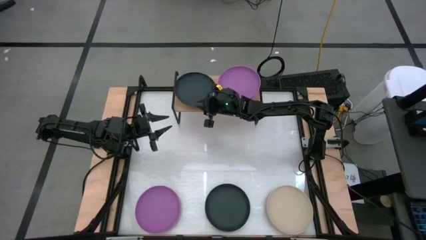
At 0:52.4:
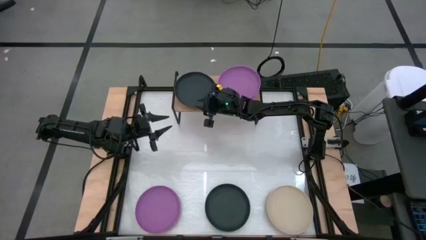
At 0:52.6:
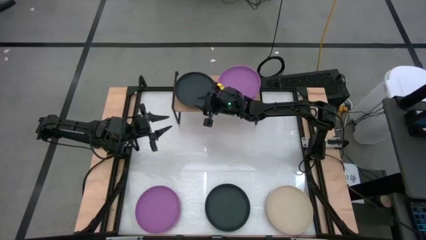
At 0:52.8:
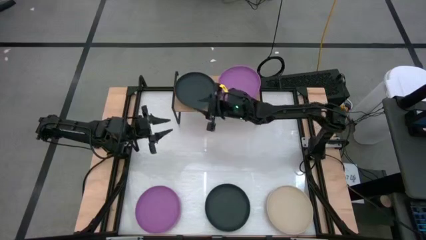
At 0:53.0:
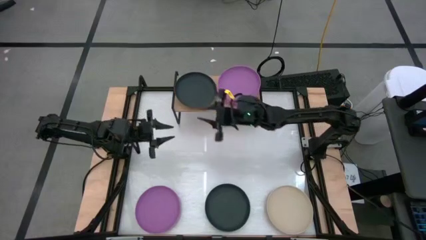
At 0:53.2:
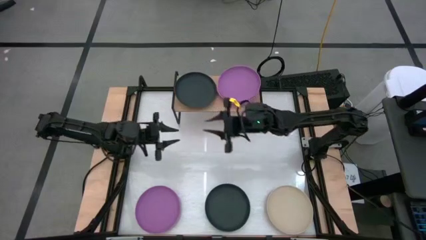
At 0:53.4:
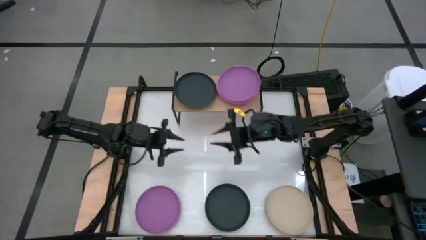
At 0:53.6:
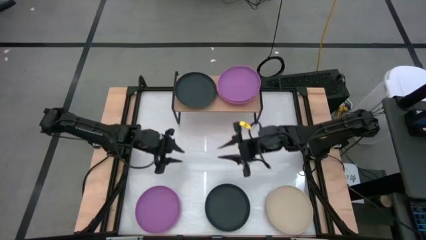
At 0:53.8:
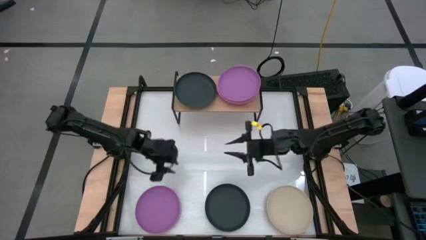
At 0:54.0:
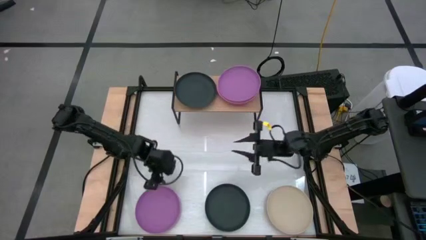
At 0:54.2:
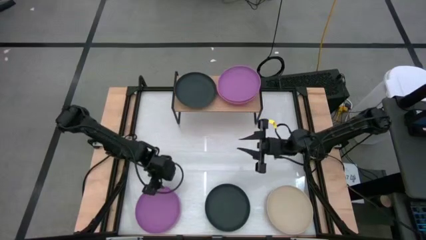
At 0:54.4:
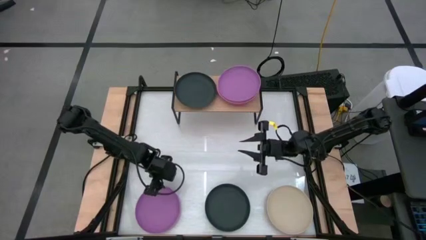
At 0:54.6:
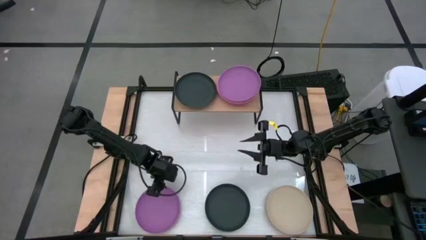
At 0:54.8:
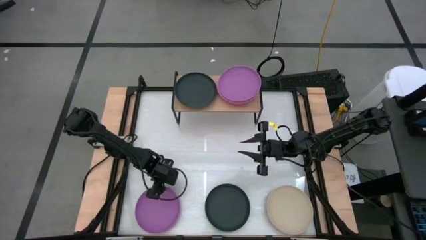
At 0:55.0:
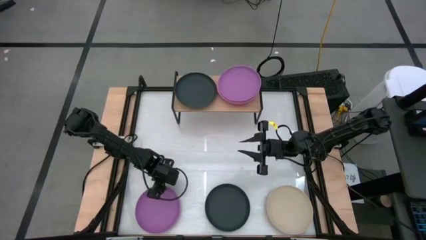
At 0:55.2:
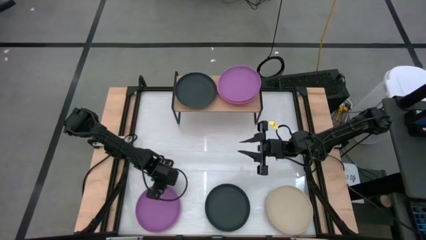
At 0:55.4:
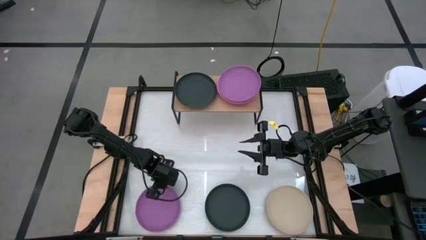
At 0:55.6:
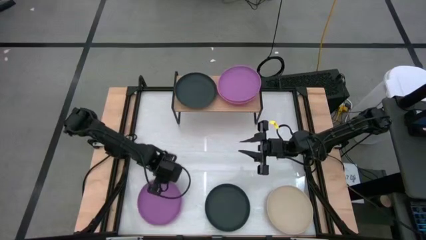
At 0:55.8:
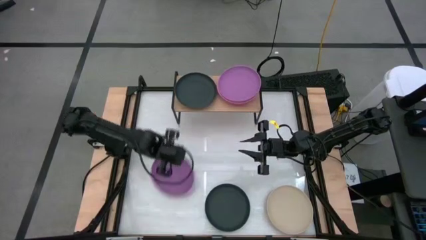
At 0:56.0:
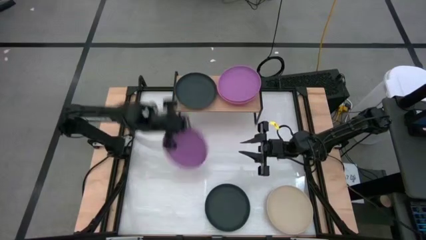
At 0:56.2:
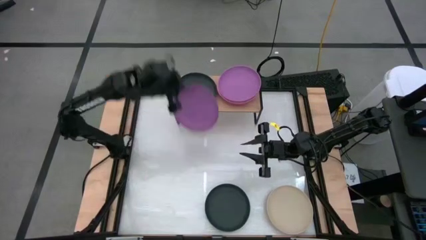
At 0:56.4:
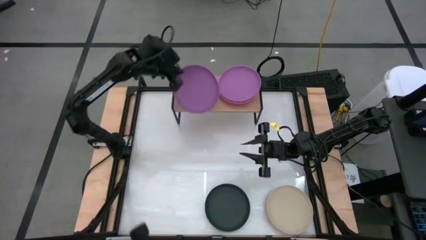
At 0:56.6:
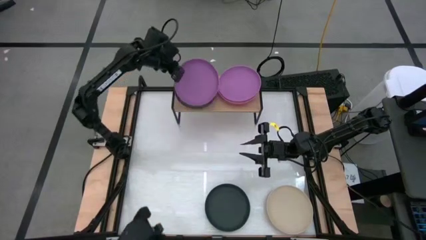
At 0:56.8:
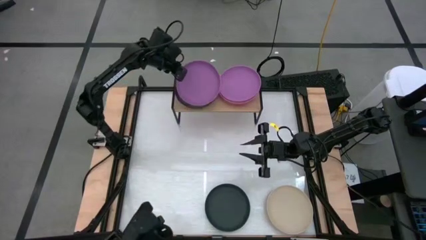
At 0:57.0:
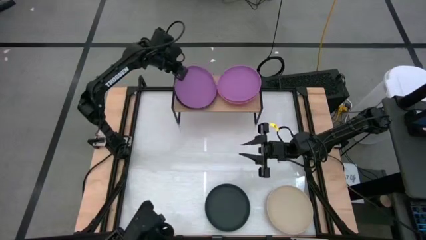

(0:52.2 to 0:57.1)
Task: Place and stack plates onto a shelf
Stack the purple plate on top of the black plate on the shelf

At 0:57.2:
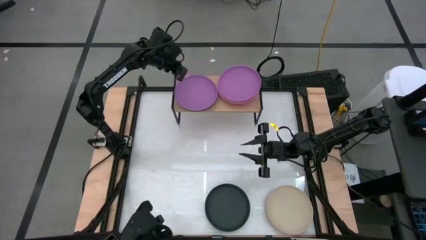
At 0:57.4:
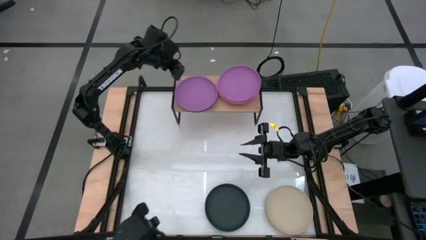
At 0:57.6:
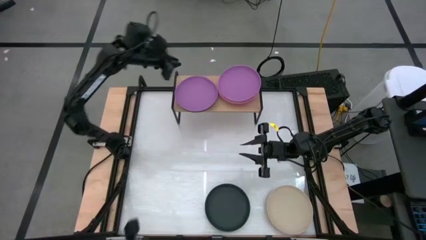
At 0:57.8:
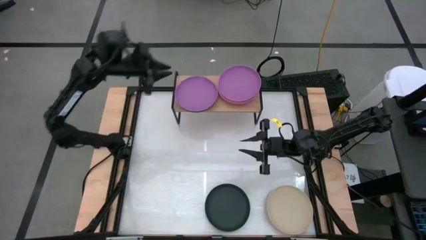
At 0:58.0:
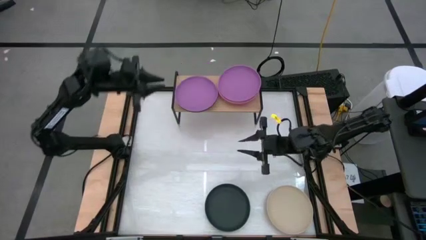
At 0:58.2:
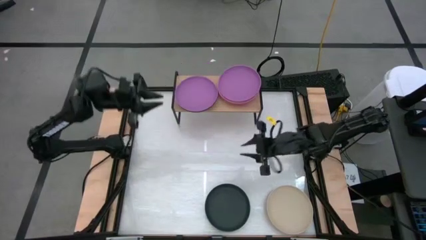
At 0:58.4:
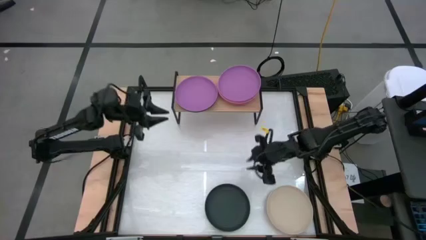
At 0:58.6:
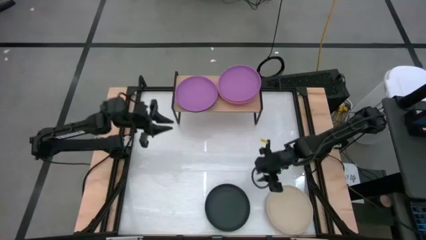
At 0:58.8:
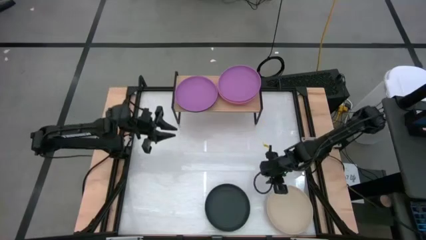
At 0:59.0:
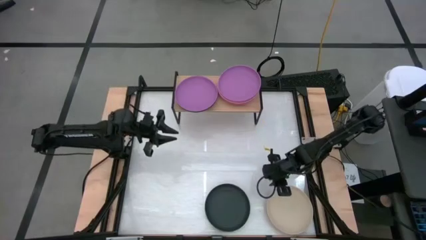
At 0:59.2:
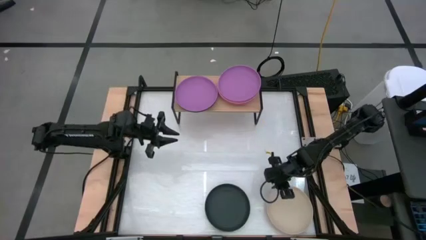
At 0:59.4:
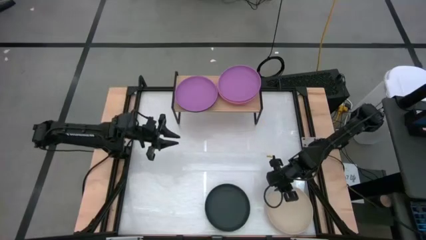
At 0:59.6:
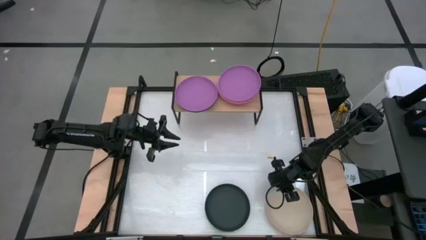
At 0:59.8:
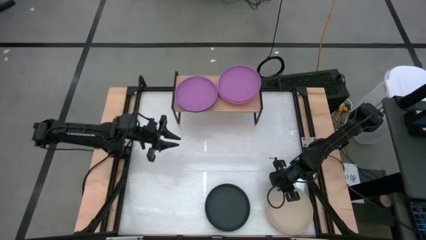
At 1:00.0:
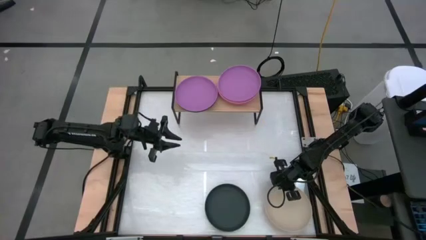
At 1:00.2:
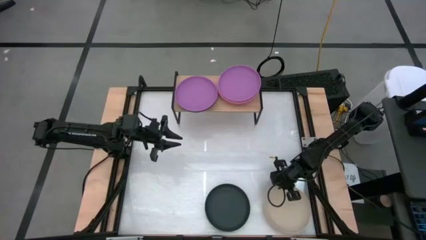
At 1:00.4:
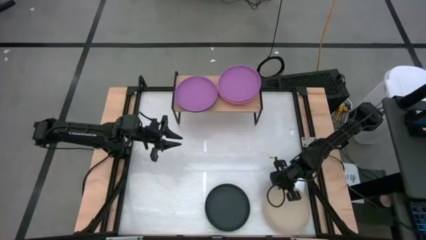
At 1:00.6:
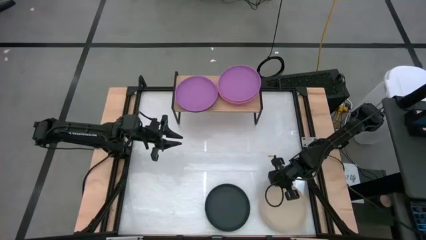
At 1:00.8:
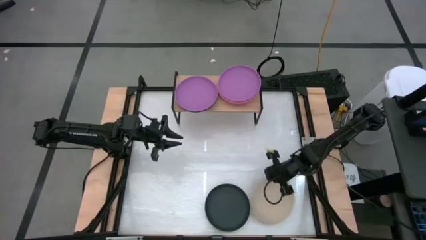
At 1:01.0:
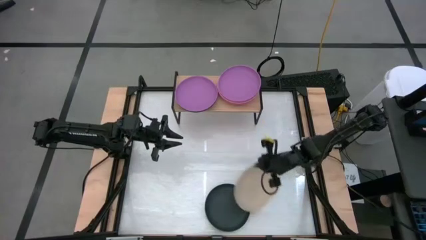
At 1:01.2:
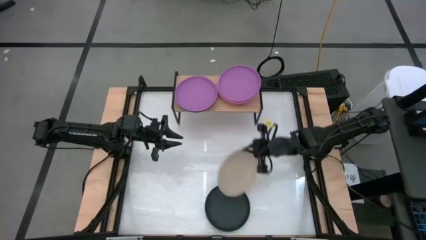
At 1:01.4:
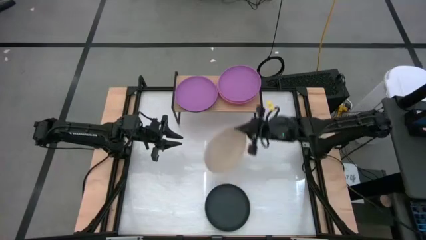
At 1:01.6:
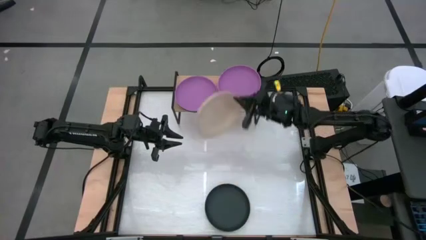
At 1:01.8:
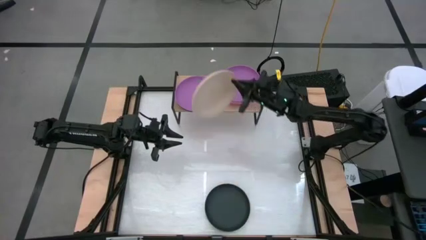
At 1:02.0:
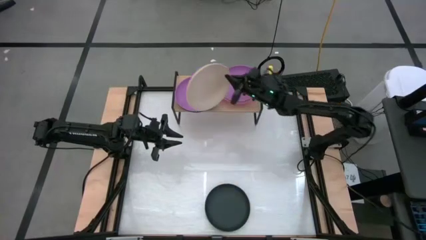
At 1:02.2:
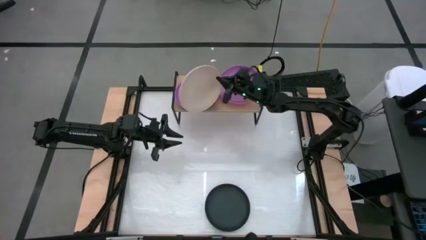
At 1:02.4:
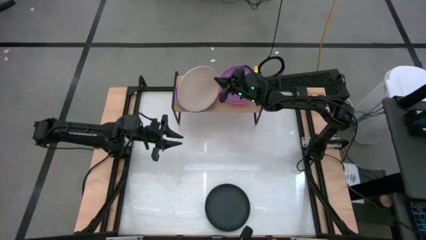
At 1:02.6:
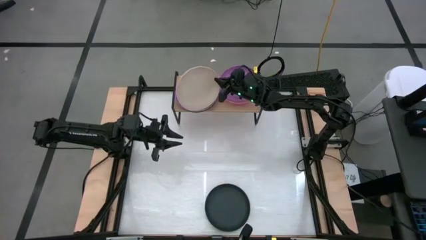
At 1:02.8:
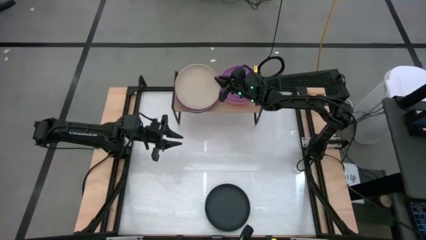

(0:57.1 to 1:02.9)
Stack the brown plate on top of the purple plate on the shelf

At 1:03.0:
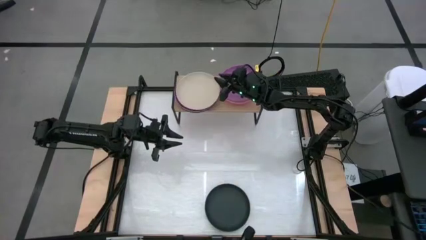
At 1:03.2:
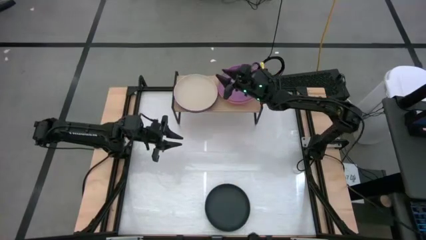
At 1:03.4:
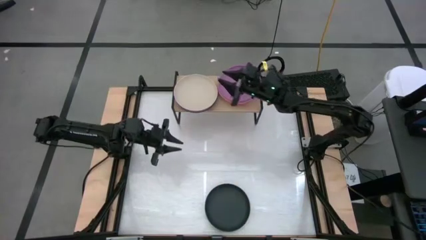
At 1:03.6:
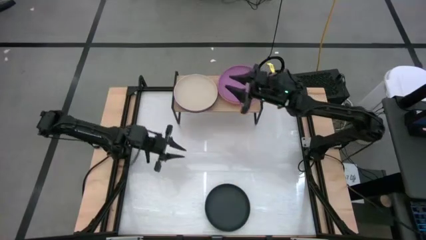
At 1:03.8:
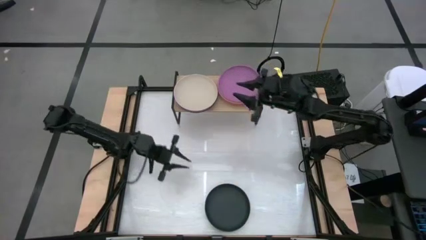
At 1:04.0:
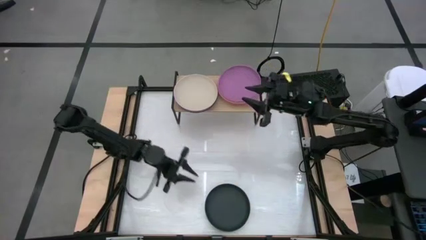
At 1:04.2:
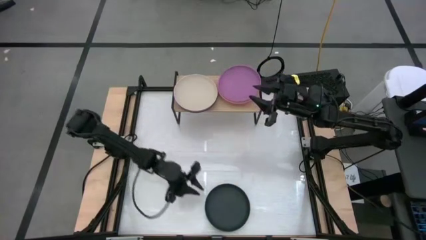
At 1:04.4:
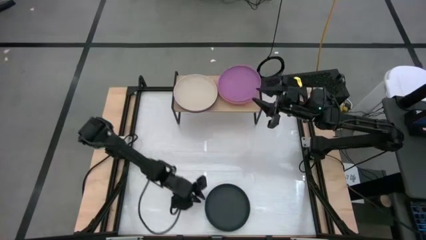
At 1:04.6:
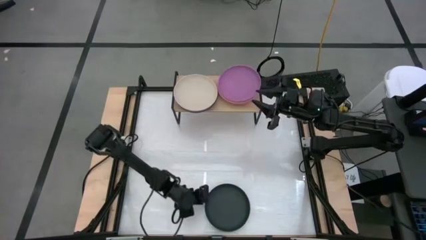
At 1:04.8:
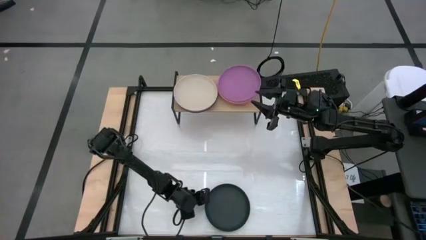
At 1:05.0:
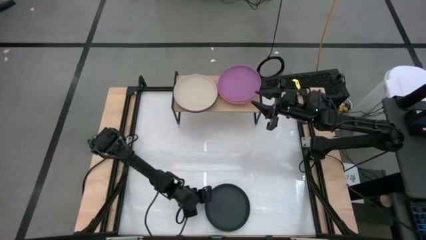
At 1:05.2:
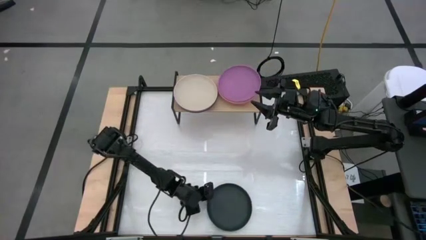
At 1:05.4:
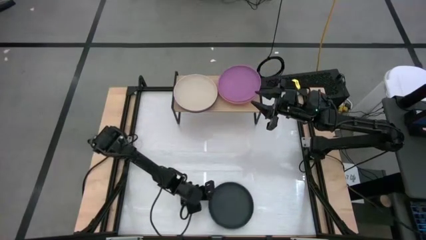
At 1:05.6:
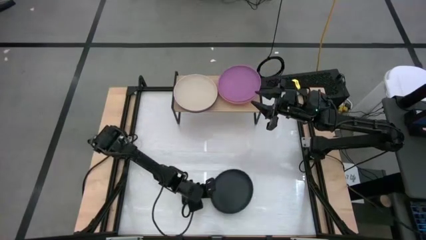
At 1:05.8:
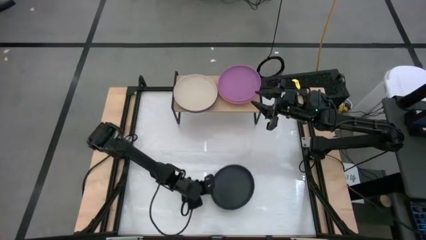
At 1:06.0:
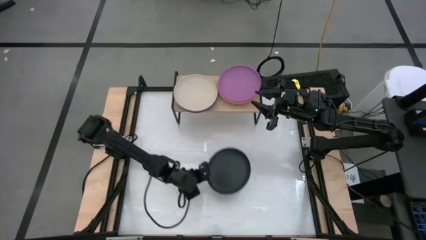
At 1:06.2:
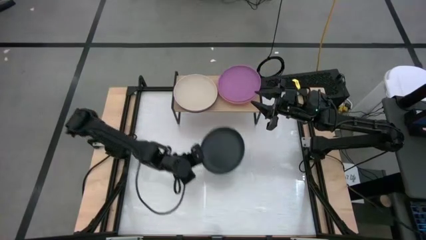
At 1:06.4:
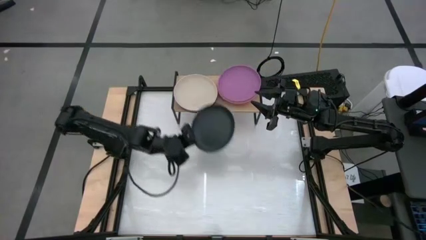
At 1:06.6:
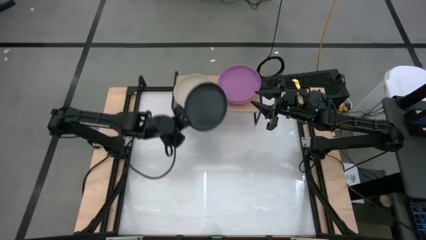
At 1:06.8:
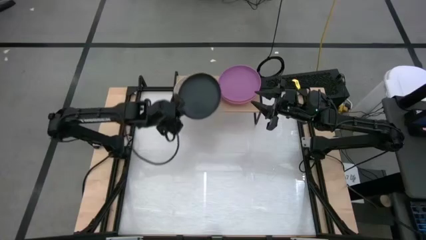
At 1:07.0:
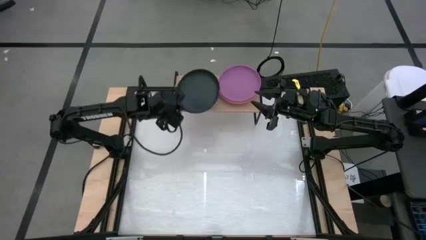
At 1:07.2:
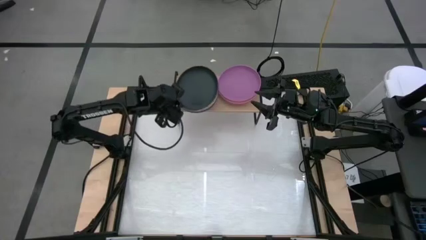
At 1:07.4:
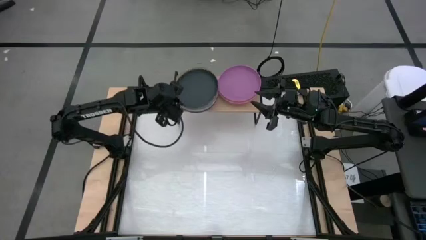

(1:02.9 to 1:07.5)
Stack the black plate on top of the brown plate on the shelf

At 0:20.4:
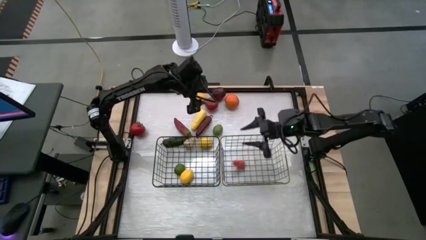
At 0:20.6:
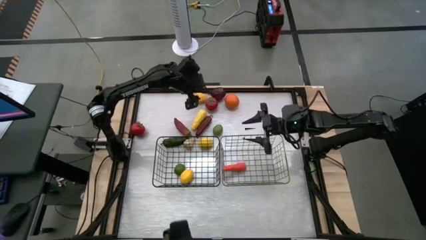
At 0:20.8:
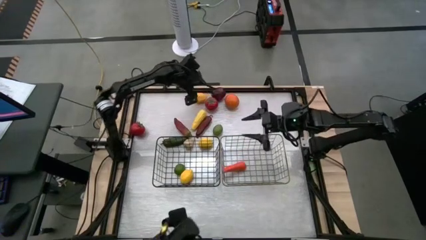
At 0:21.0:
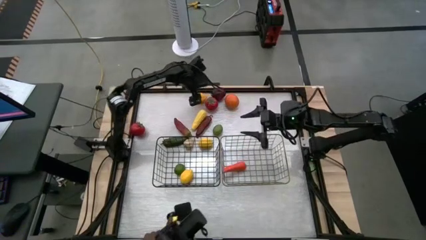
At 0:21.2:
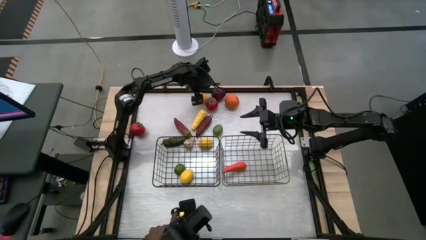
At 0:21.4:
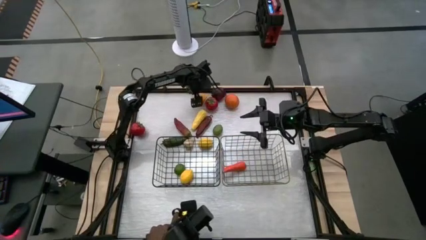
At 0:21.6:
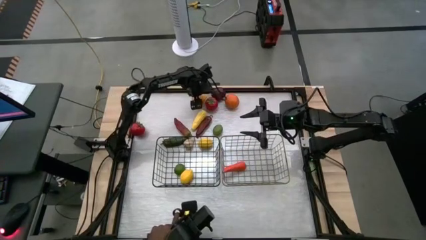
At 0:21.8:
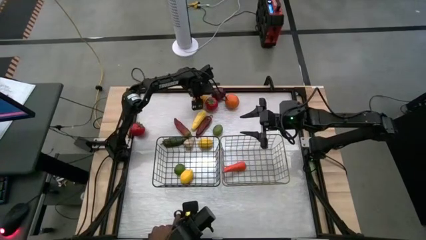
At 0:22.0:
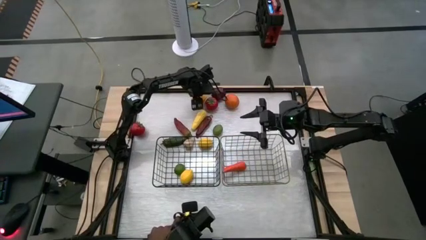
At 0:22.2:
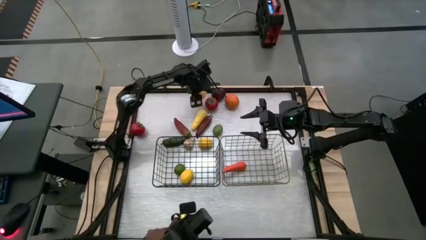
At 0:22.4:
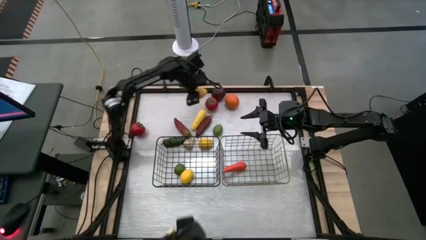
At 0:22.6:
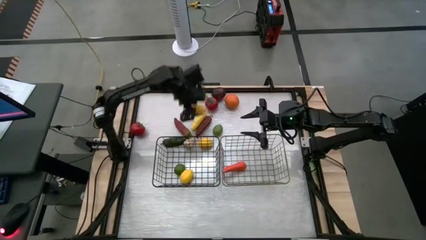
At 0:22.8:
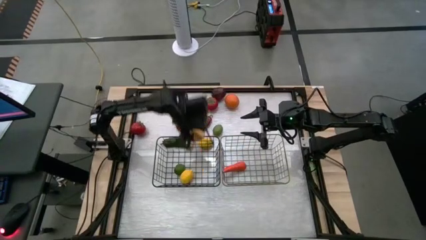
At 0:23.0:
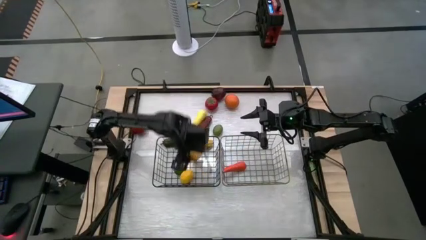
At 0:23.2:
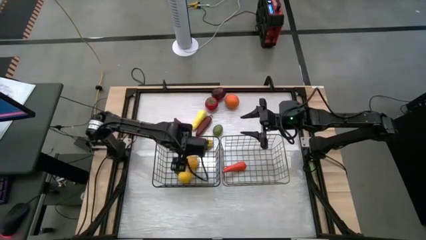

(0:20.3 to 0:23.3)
Task: Sort produce into baskets
Put the top yellow lemon into the black wire basket
